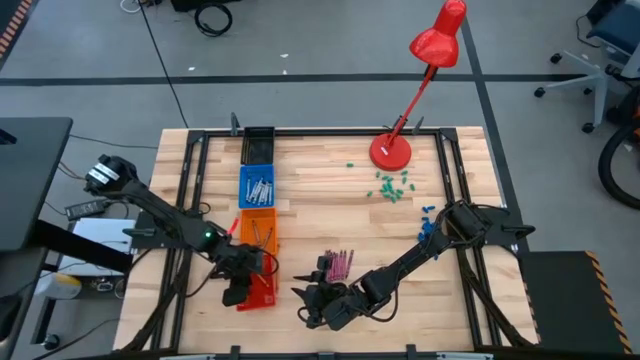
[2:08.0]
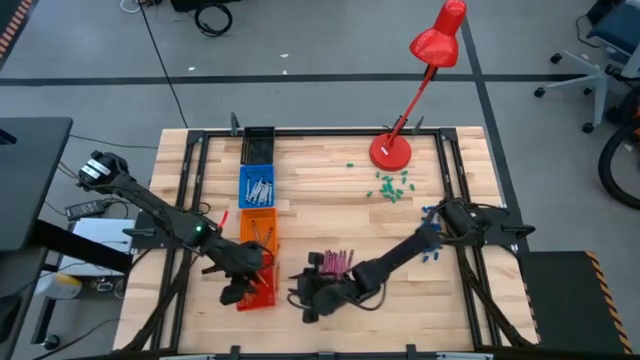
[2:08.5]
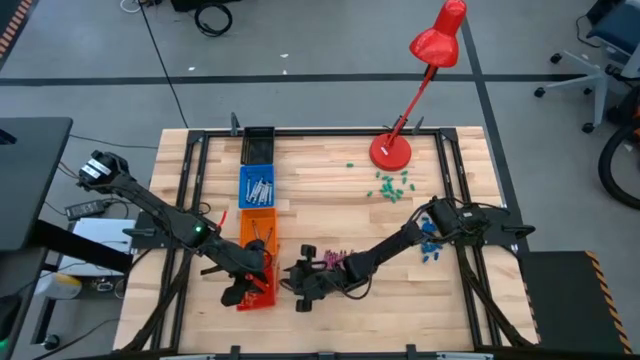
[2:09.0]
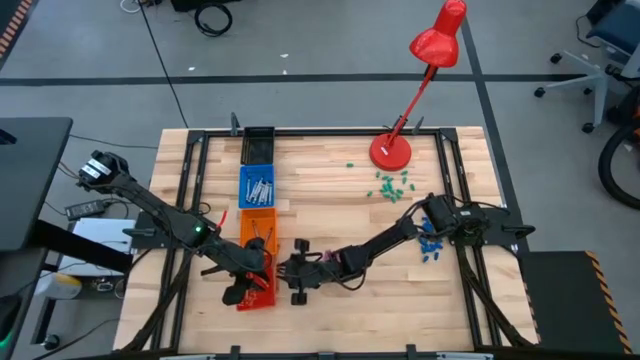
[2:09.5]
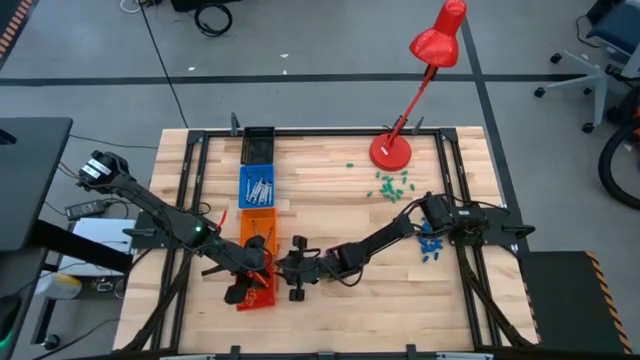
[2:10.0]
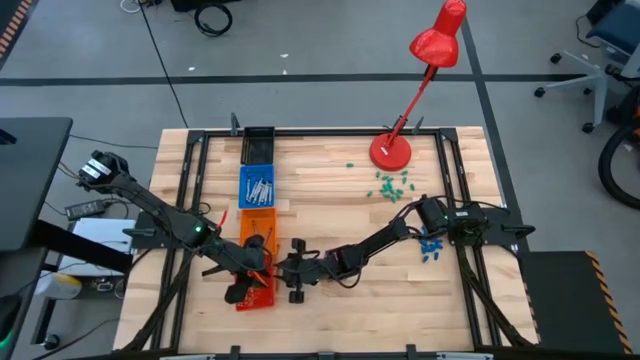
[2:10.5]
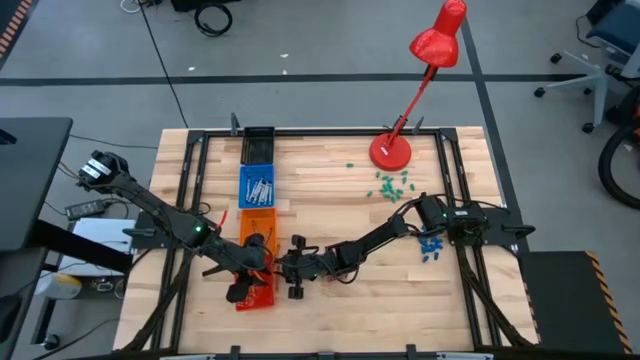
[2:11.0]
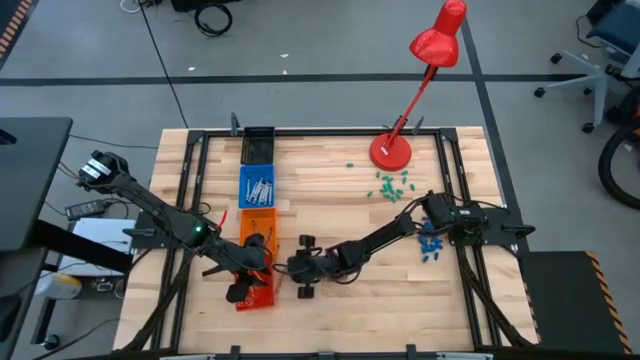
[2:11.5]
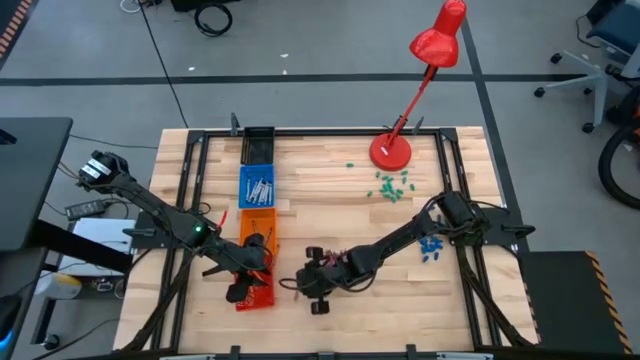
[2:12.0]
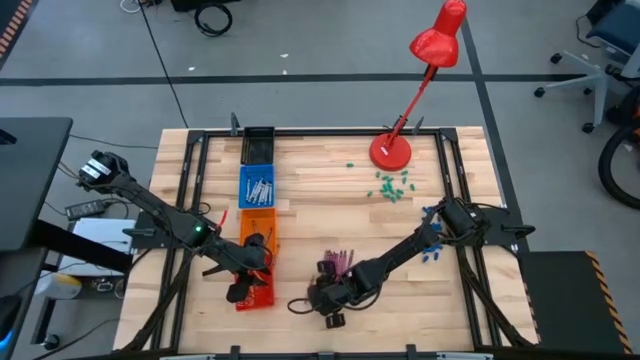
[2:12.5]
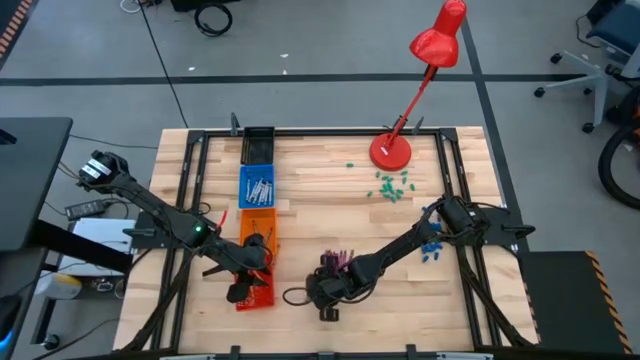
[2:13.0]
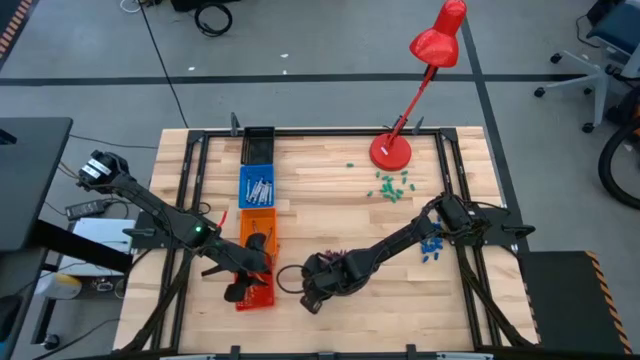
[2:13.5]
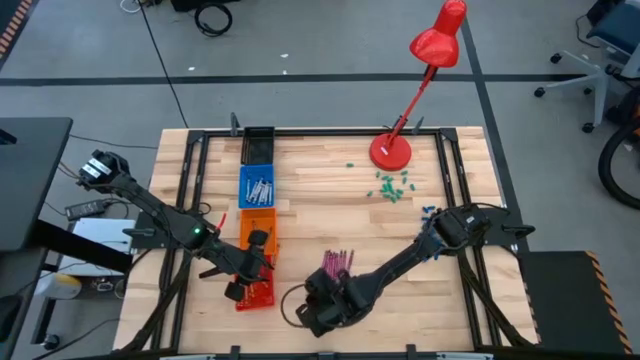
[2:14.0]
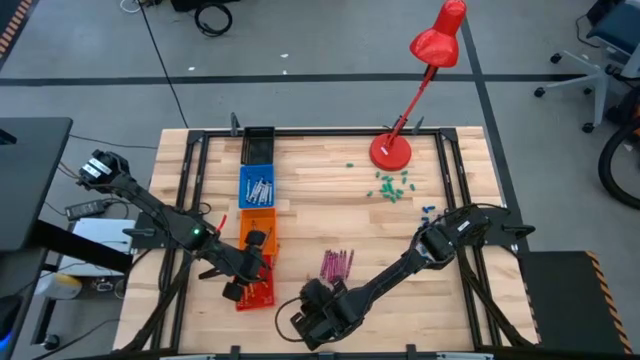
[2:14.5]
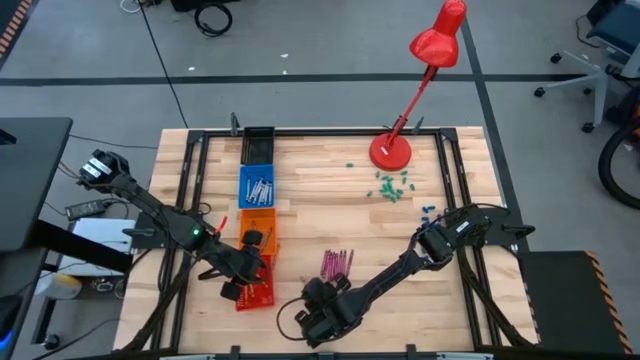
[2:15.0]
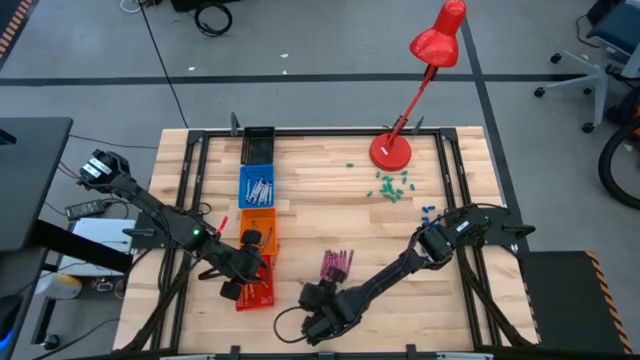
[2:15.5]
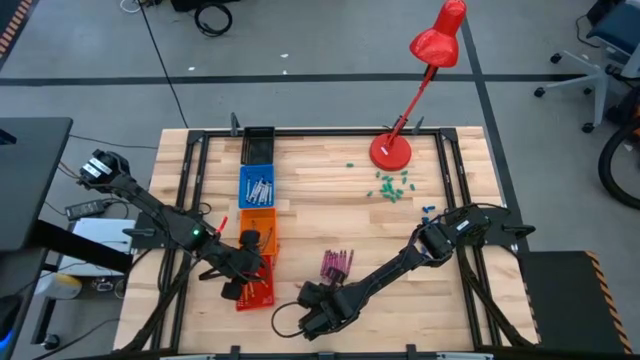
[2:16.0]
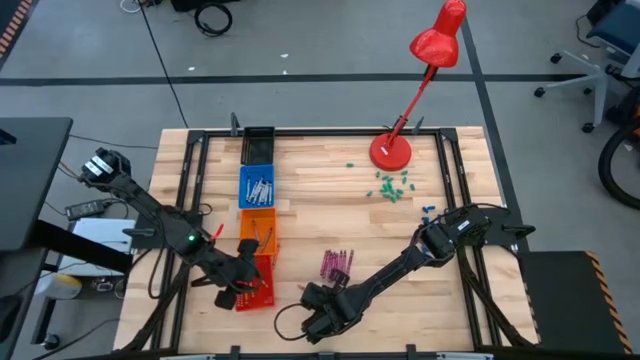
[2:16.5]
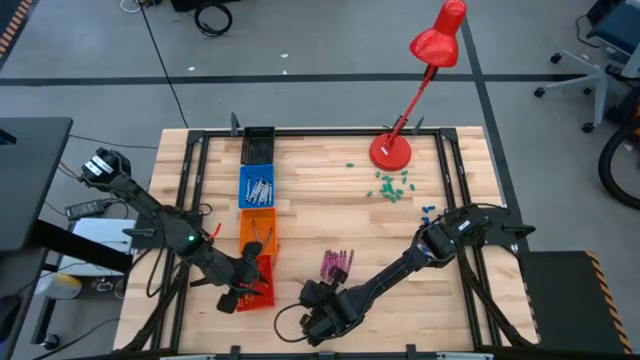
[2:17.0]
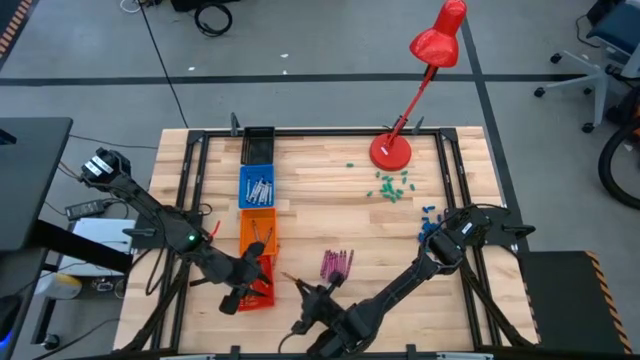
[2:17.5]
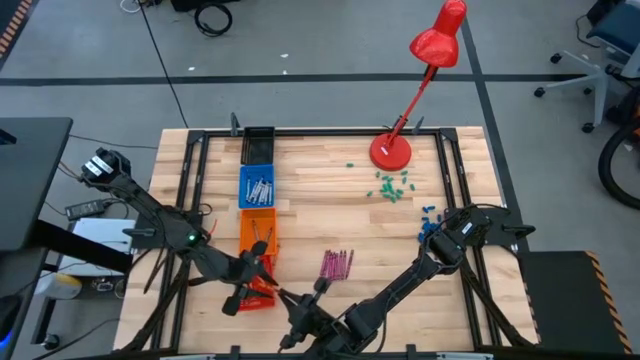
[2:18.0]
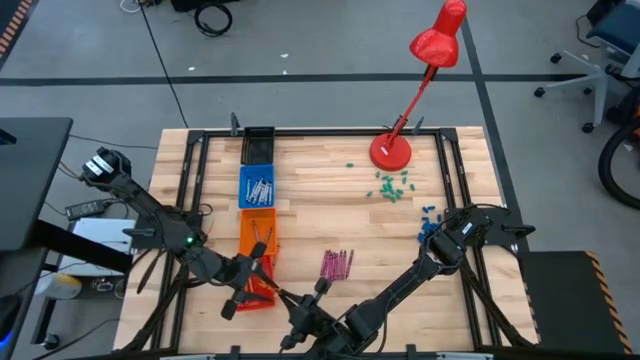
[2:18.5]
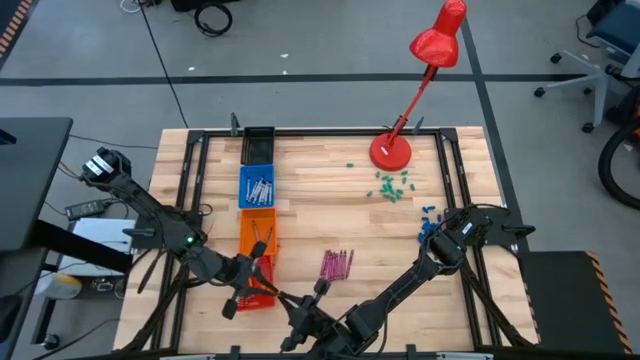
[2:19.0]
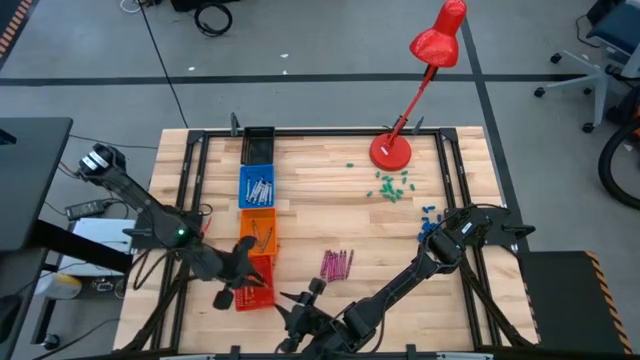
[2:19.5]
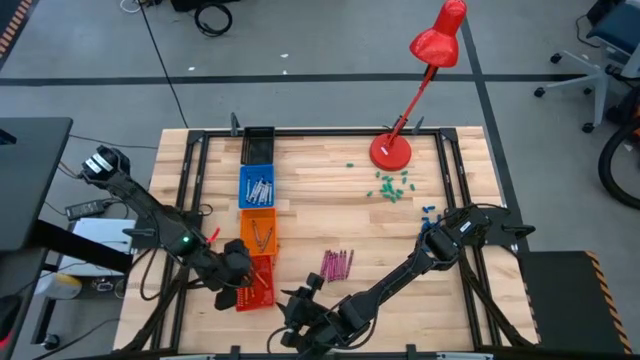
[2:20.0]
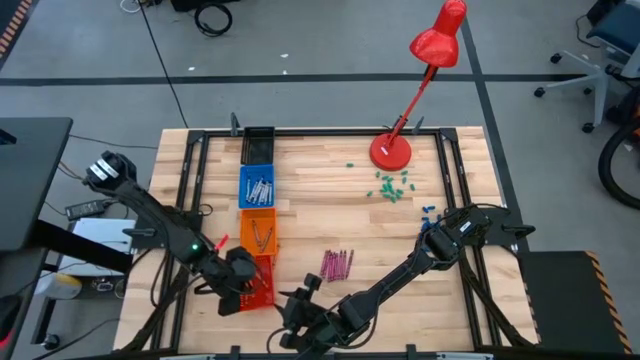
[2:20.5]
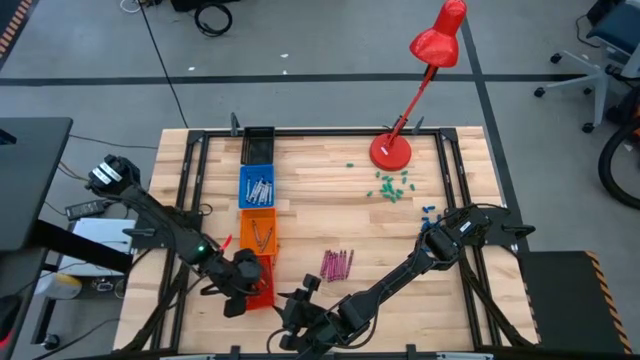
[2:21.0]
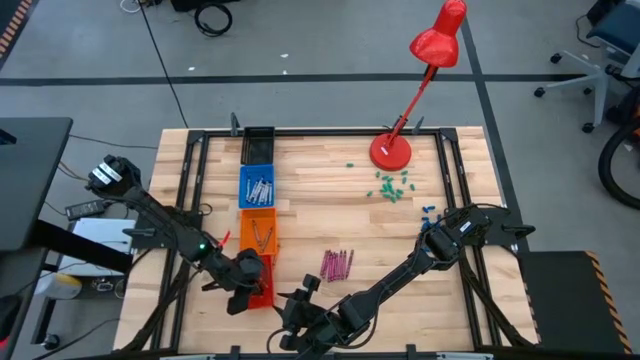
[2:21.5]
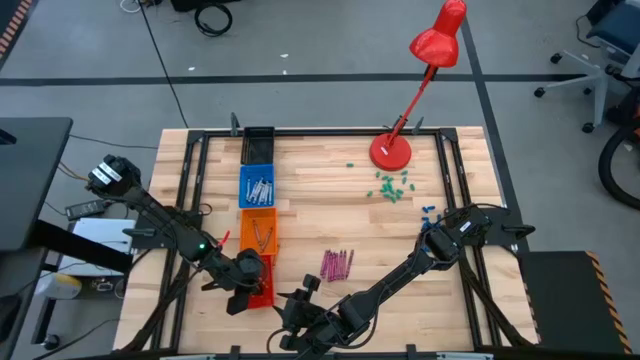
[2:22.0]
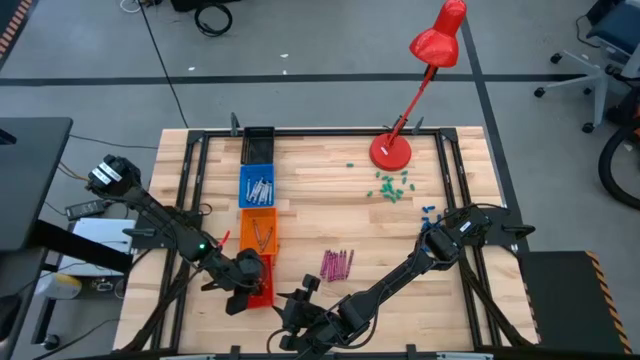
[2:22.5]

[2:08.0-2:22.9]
Task: Sort crayons
Put the orange crayon into the red bin

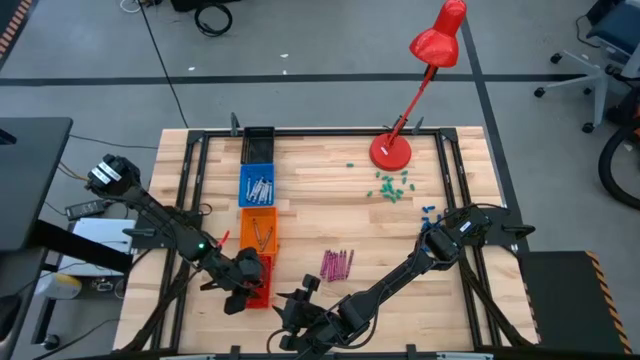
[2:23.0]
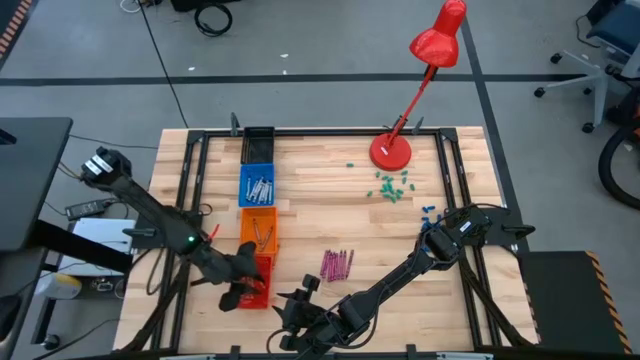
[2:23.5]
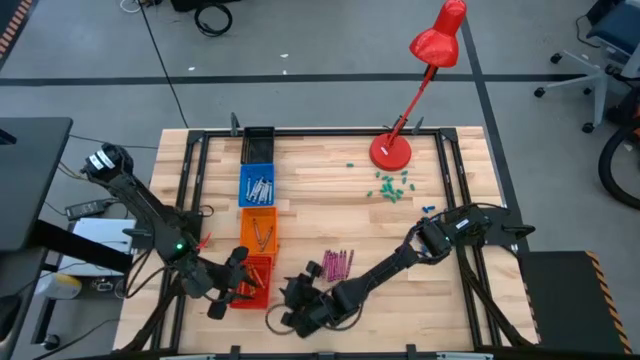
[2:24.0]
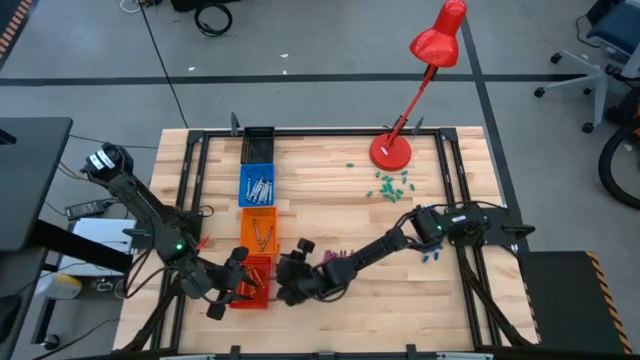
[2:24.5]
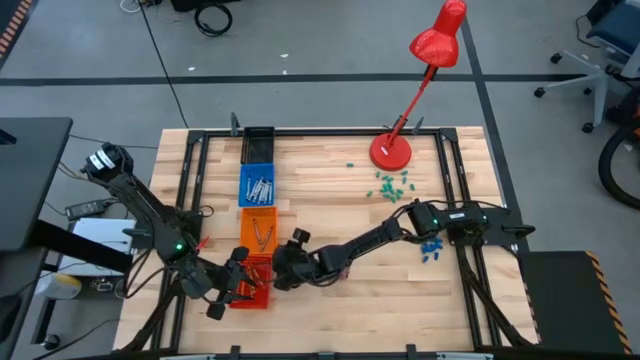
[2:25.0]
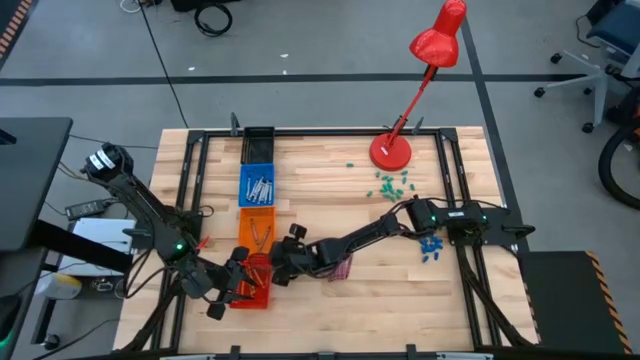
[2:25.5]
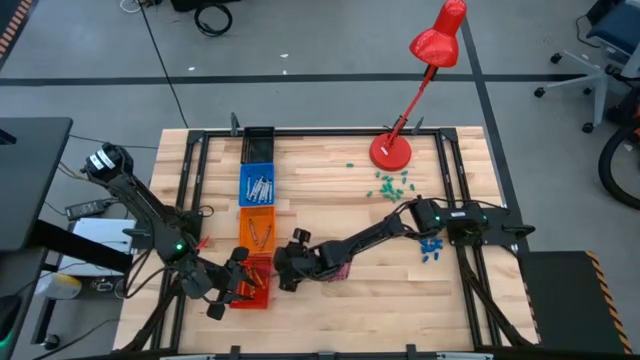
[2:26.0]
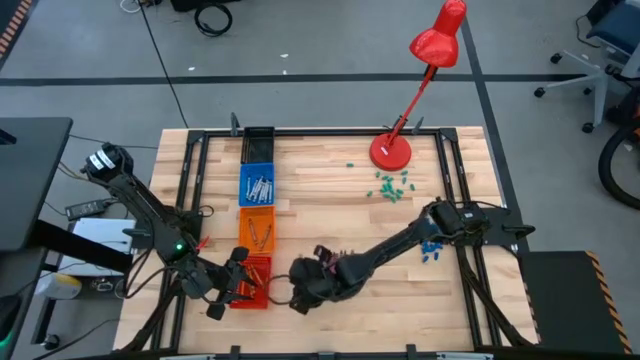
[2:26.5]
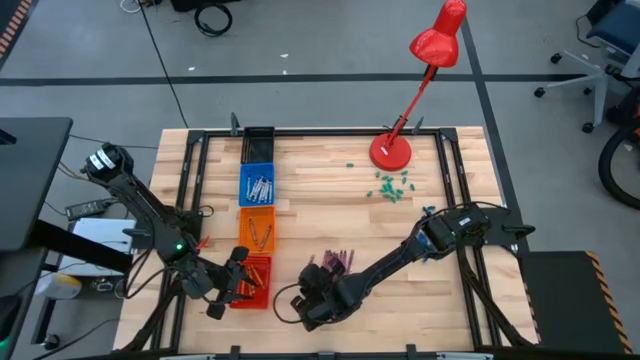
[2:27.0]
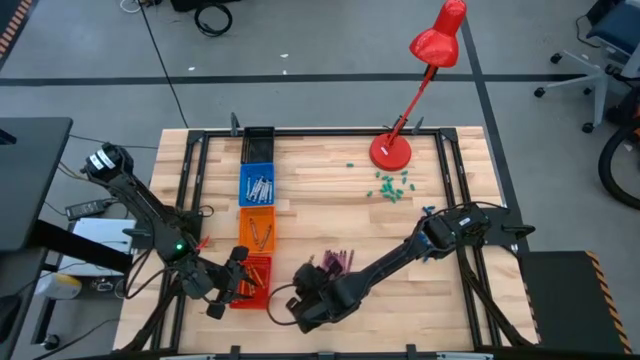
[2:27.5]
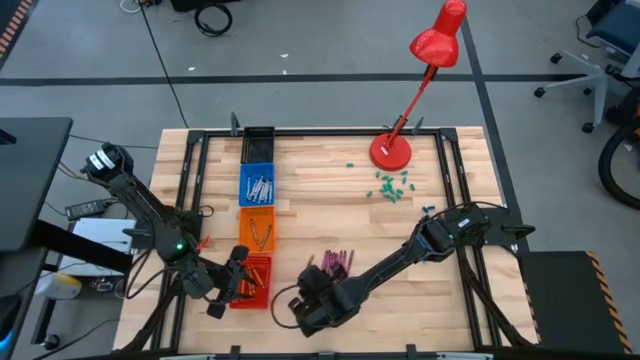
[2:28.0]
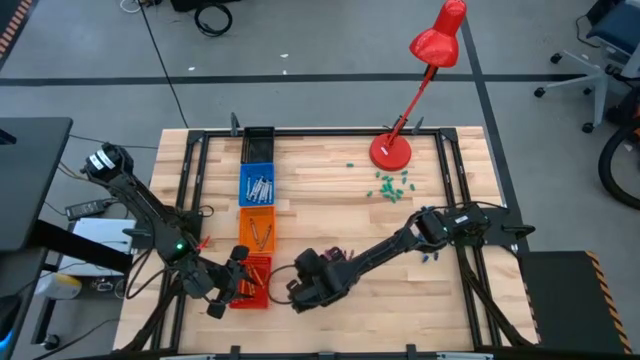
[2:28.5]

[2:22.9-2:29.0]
Put the orange crayon into the red bin
